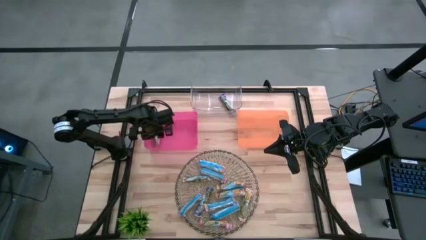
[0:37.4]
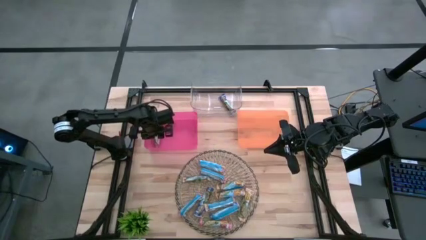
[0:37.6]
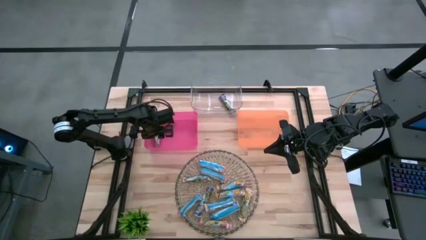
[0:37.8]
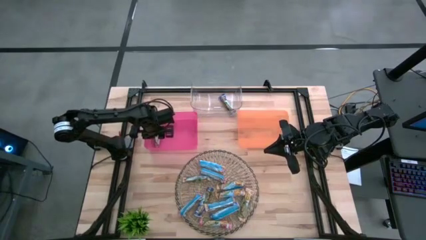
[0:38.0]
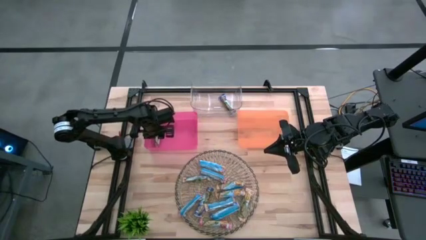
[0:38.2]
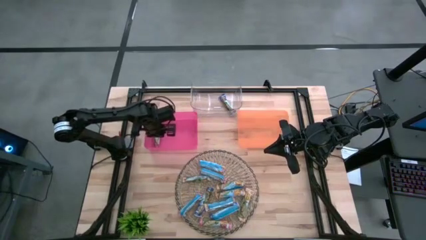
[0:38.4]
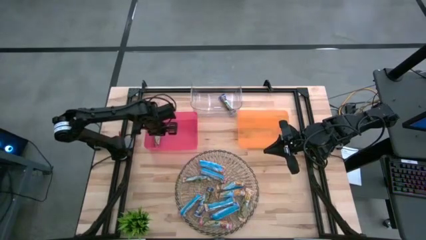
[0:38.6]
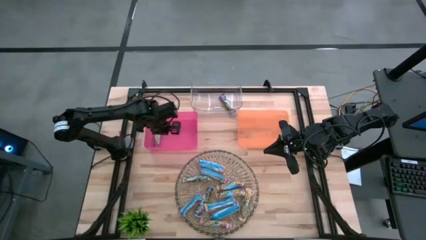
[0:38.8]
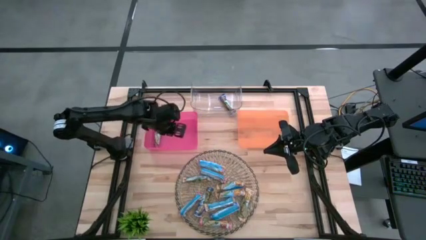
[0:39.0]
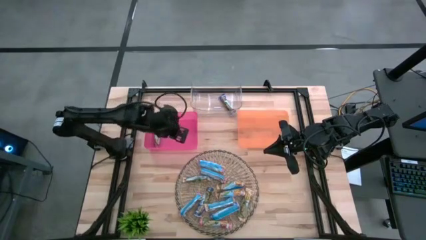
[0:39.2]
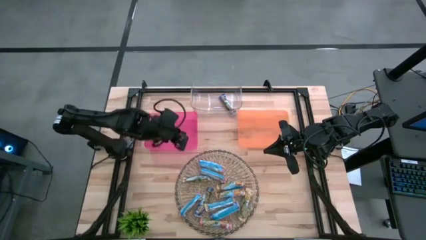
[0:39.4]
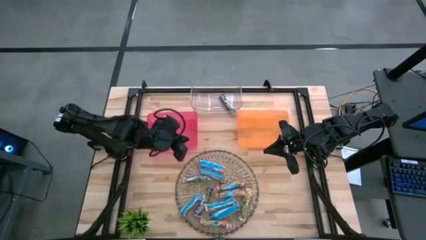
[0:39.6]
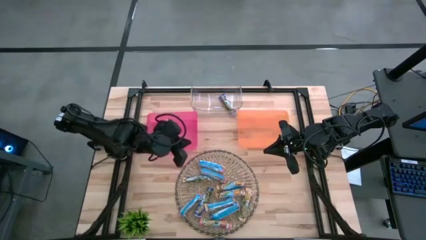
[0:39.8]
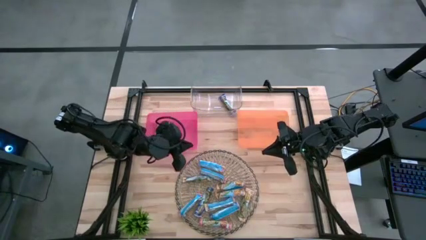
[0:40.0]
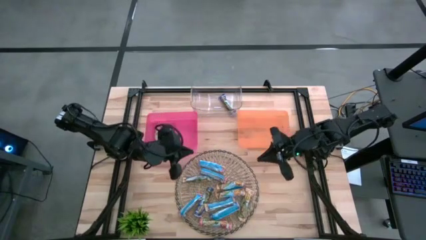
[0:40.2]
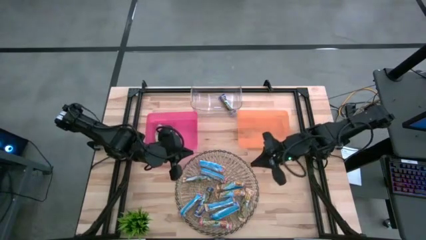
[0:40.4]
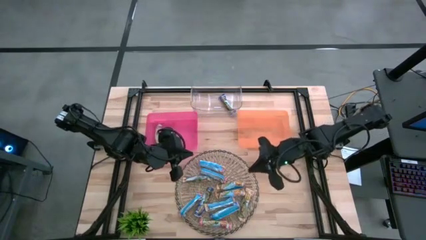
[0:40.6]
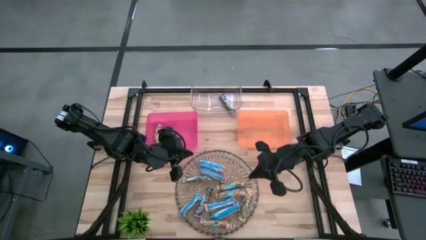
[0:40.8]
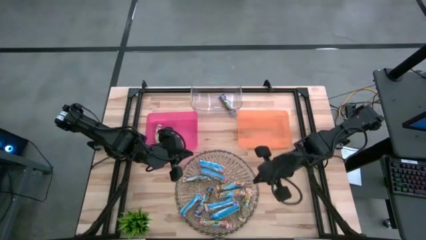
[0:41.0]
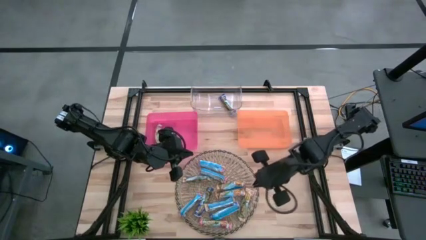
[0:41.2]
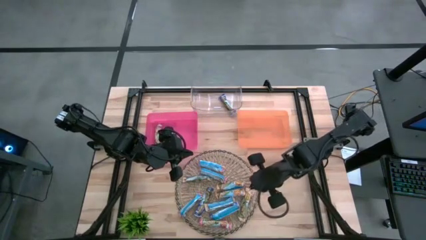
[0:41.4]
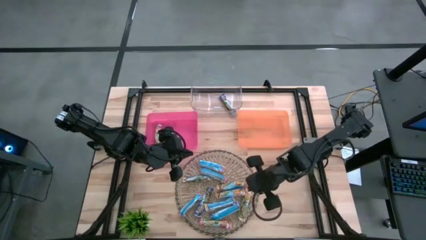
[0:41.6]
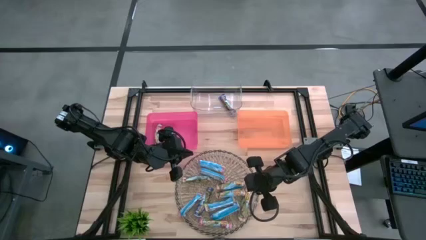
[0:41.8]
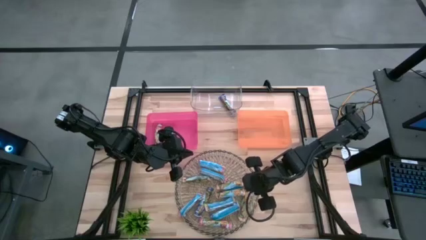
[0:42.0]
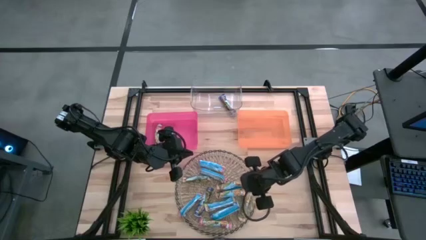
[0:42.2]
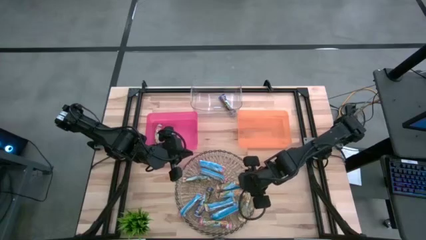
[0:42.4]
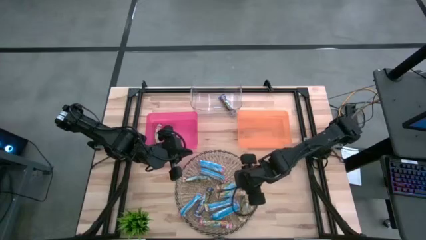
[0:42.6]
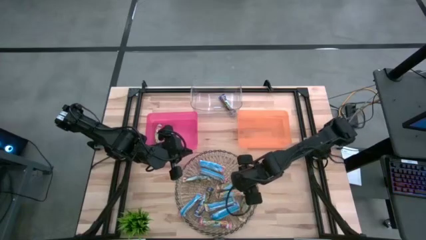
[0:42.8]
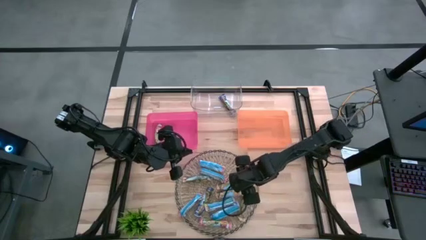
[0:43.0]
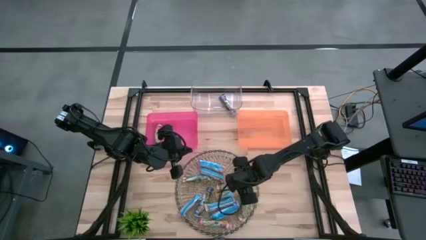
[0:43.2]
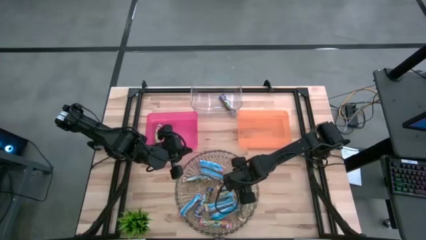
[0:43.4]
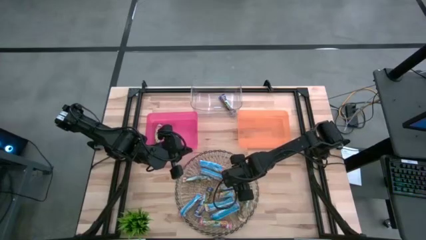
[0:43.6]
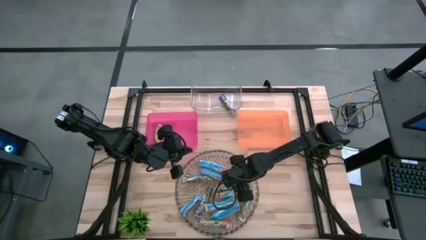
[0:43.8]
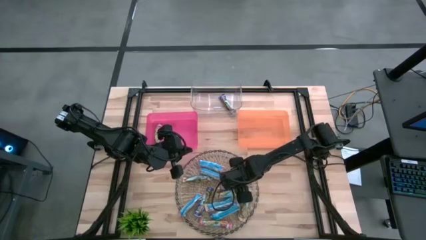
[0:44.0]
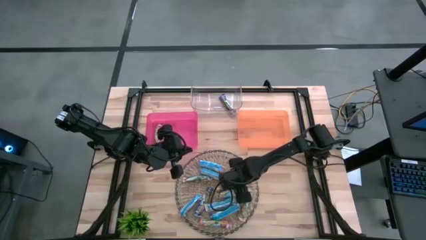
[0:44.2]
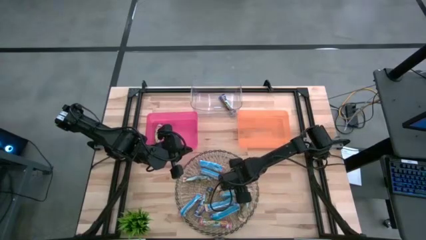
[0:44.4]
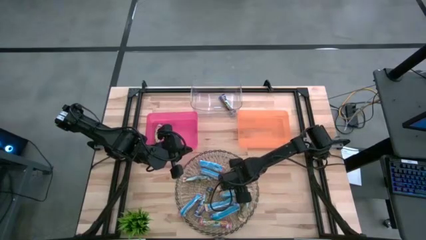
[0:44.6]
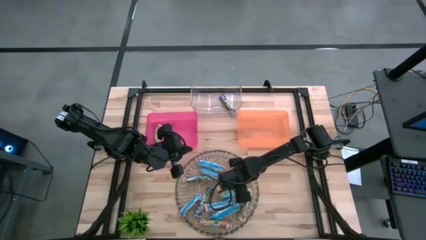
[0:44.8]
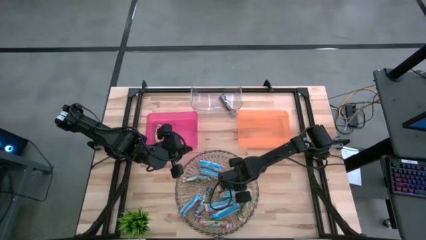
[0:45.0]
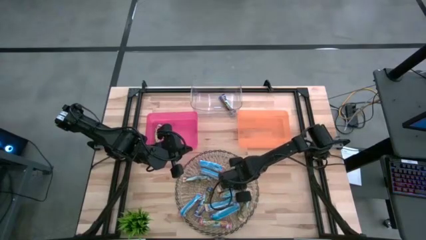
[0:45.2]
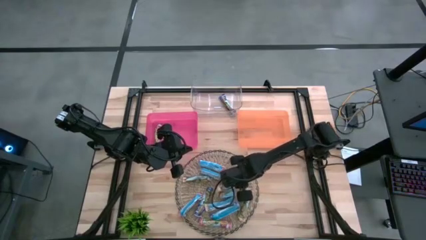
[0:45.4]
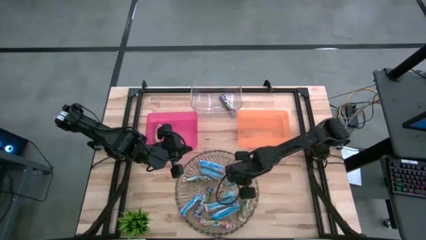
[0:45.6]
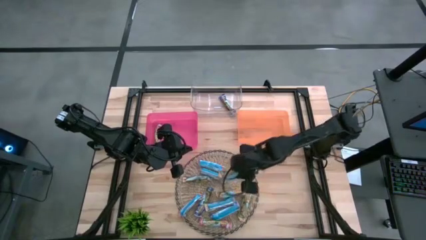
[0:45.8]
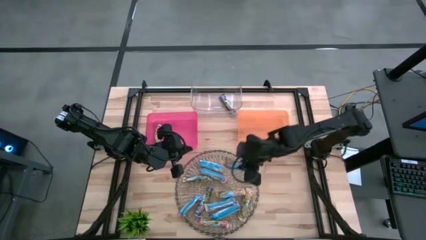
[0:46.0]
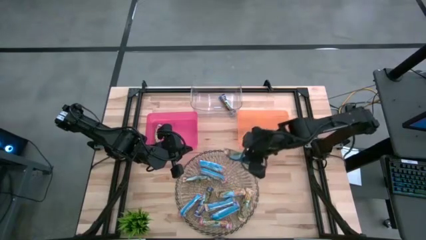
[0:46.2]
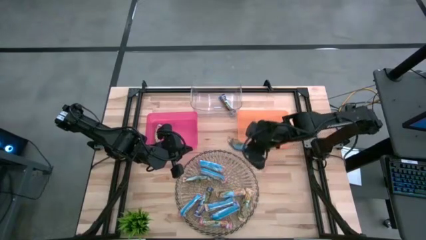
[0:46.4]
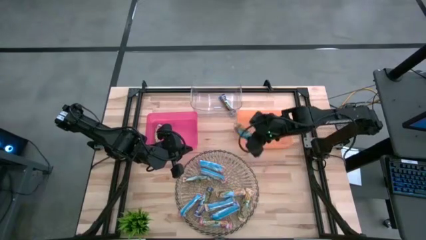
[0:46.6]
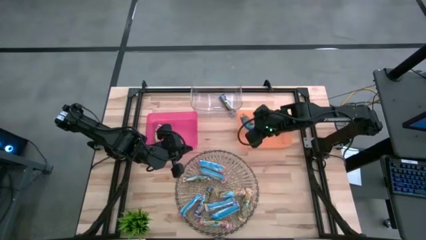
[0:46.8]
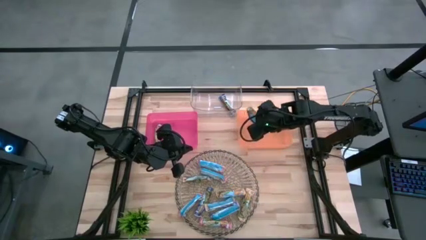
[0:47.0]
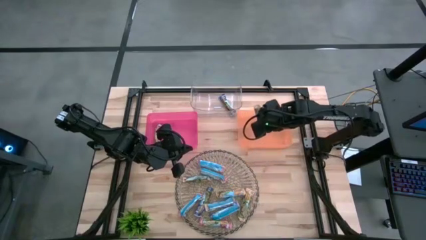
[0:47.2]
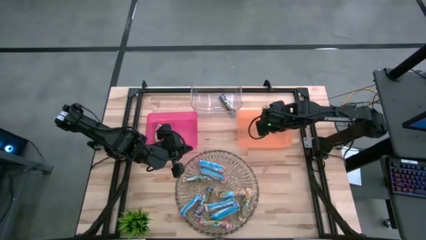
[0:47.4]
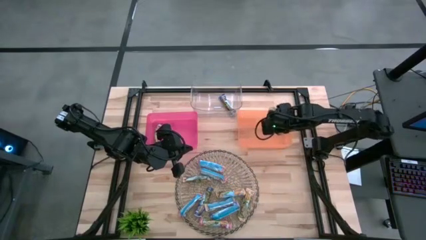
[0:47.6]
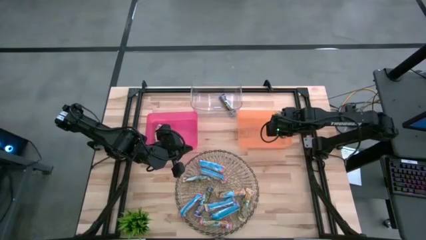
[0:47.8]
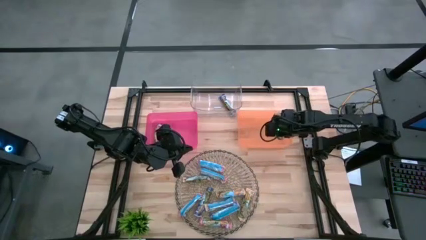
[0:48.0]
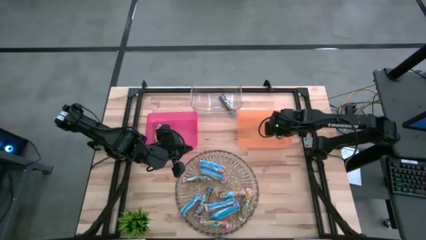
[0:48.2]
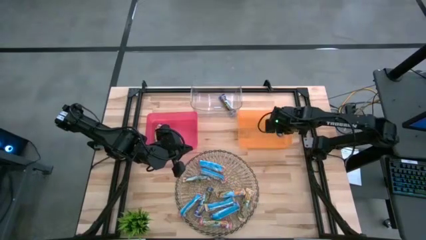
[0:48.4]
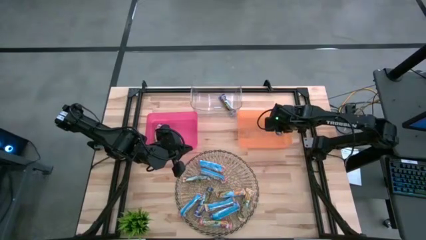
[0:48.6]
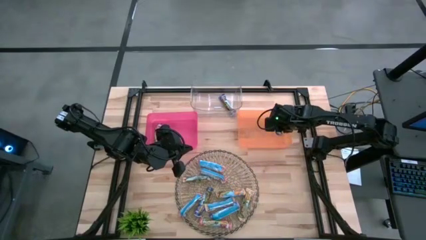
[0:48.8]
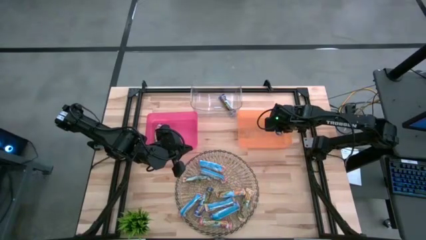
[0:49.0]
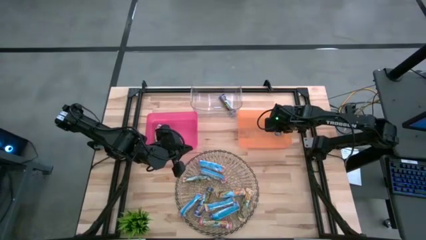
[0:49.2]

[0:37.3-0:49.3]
Task: Pick and place Granola Bars by type
Put the yellow granola bar into the yellow bin

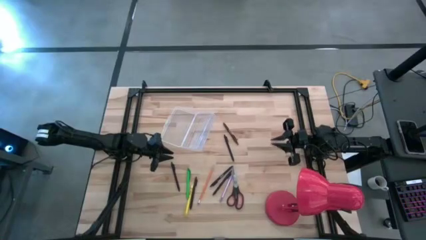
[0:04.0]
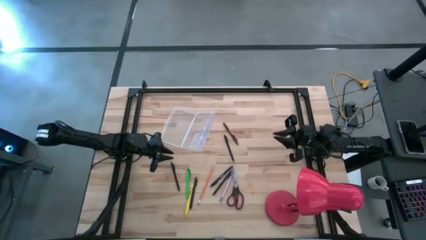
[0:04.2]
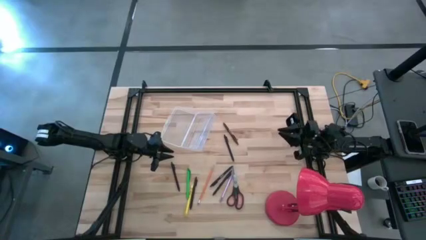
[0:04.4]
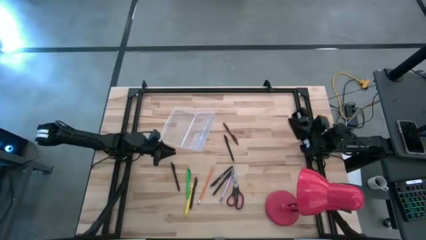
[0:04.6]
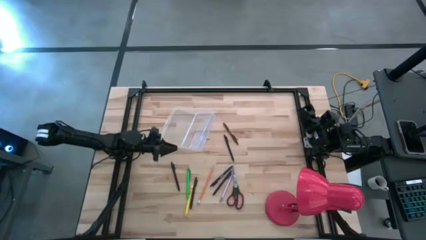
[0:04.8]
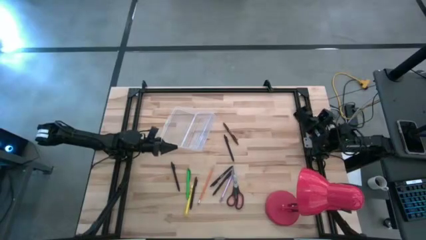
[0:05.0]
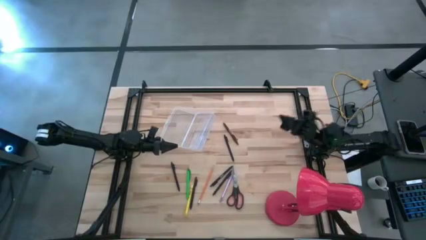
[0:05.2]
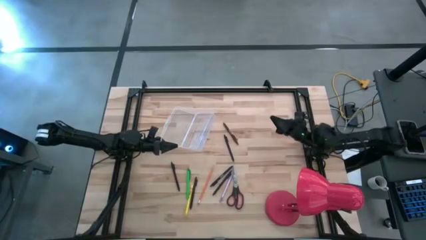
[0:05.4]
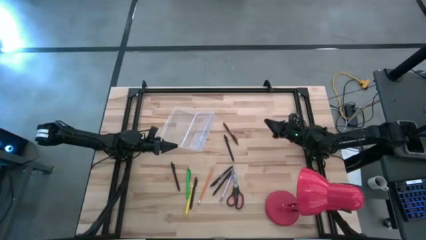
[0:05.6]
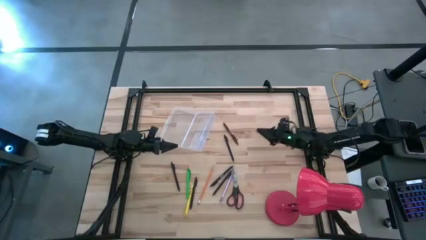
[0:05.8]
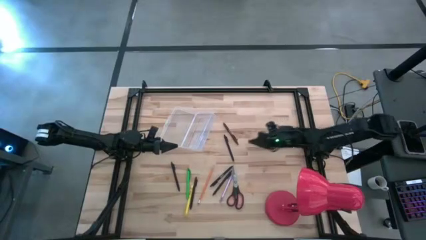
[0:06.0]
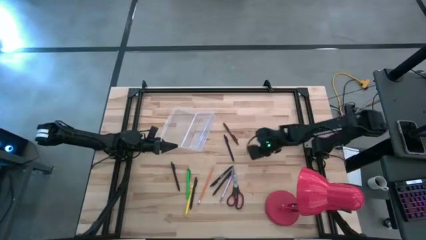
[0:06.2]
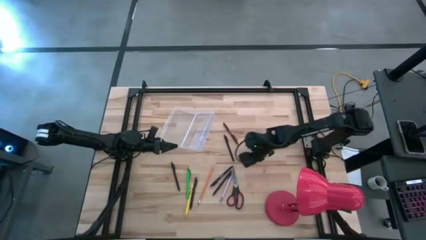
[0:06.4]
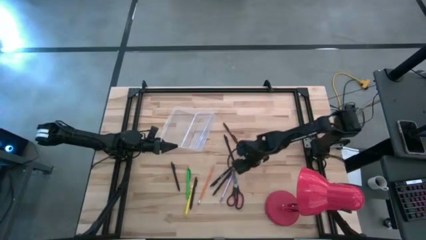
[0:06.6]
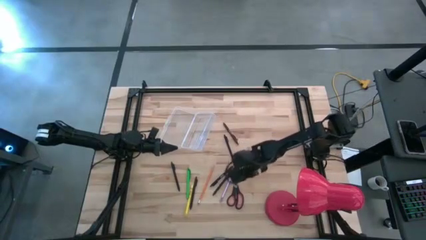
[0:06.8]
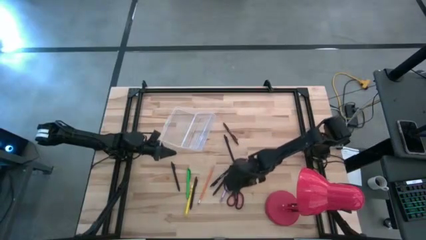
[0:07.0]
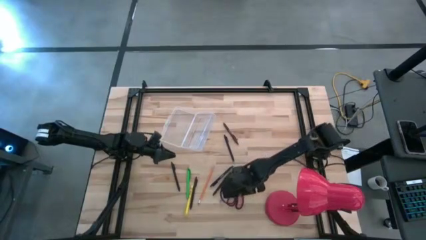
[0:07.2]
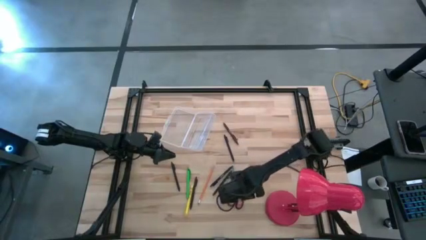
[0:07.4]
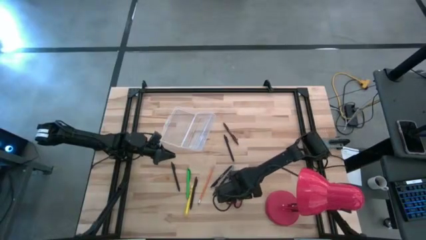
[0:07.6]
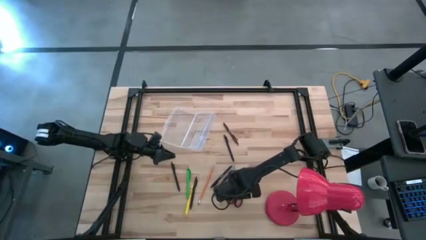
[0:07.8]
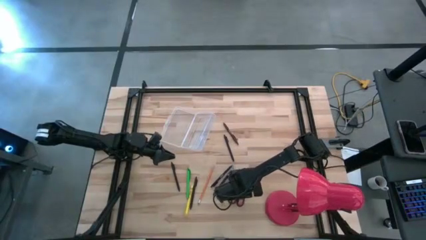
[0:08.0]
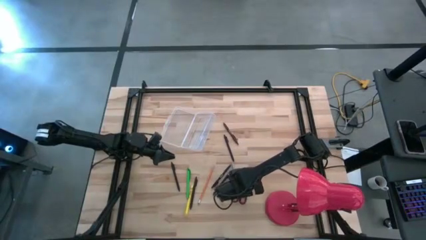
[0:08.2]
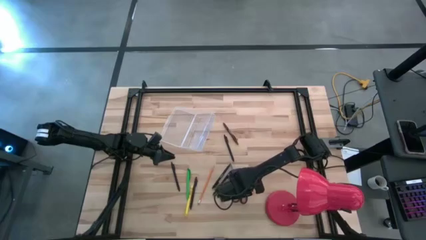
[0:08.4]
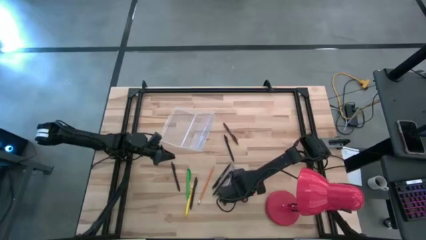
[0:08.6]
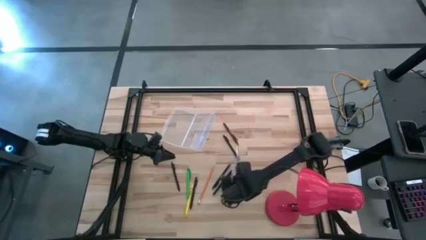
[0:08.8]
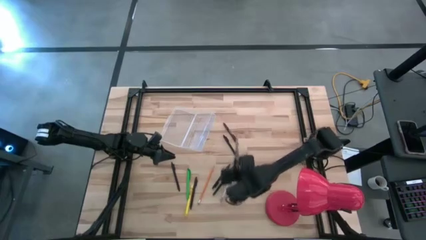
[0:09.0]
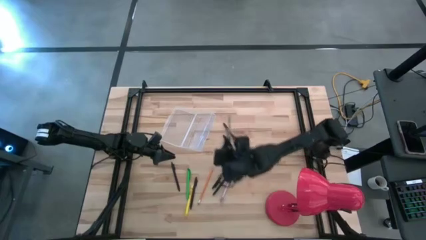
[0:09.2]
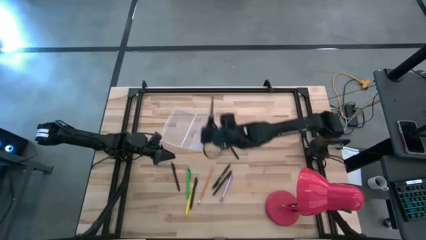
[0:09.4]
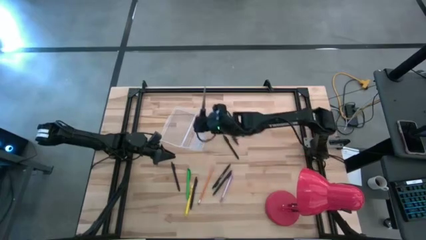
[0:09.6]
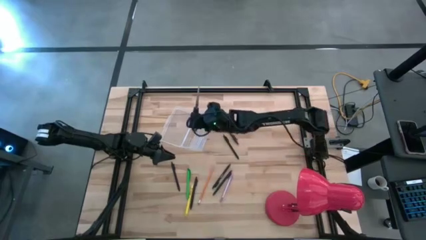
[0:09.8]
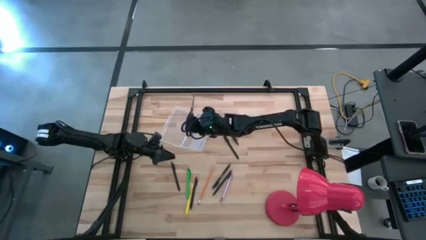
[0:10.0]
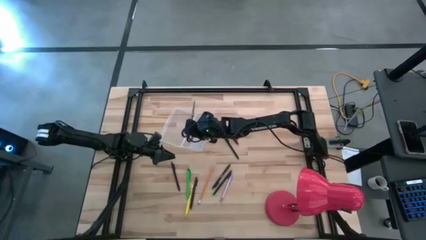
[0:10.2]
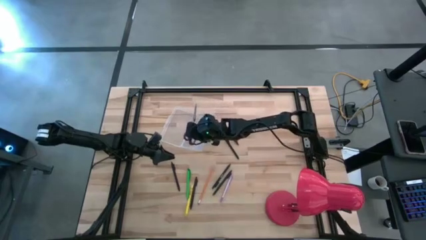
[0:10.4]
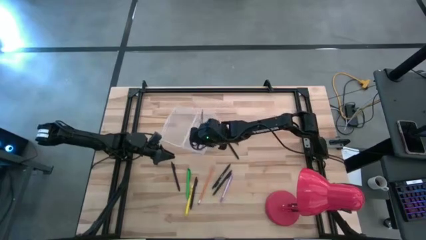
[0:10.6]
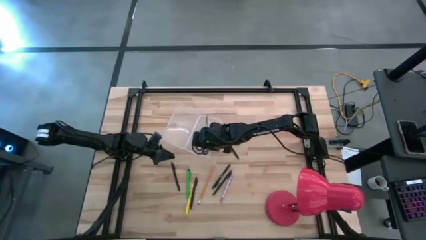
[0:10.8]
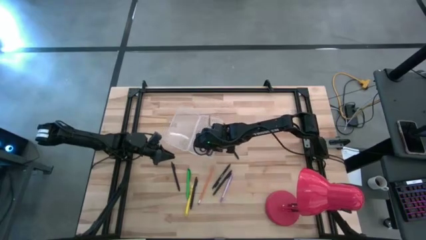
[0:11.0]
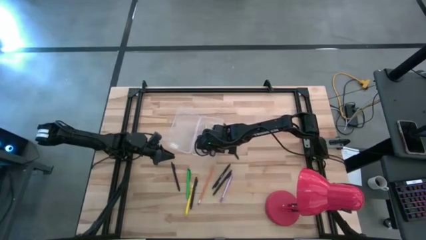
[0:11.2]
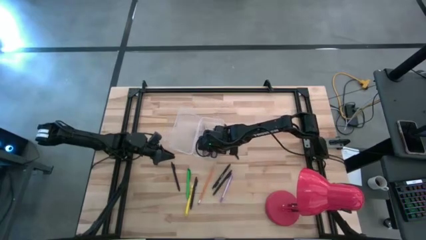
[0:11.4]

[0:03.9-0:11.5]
Task: Pick & place school supplies into a supply box
Put the black scissors into the transparent supply box
